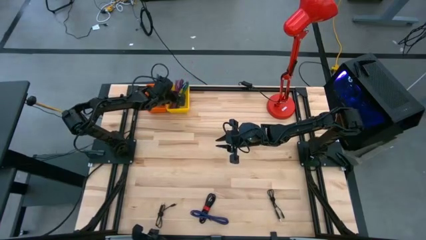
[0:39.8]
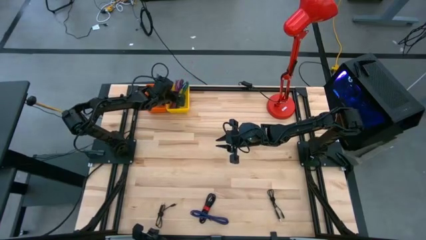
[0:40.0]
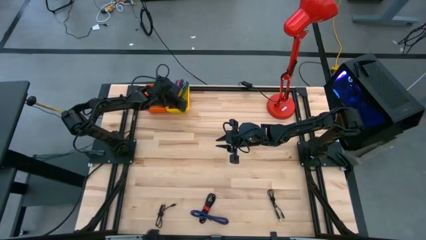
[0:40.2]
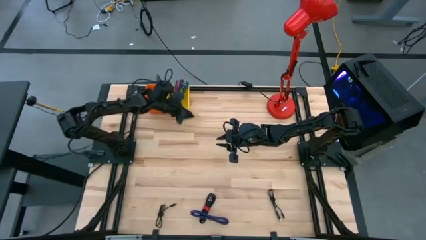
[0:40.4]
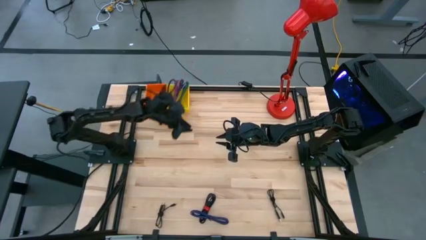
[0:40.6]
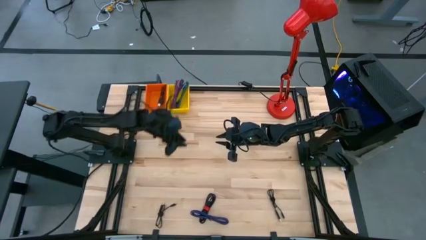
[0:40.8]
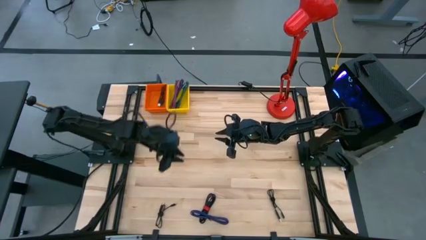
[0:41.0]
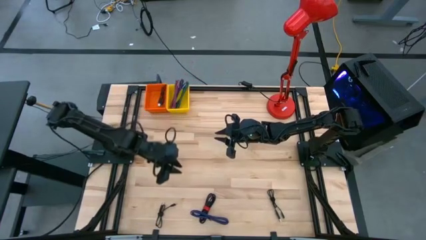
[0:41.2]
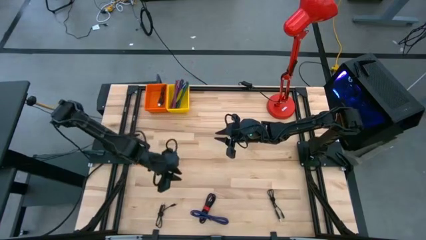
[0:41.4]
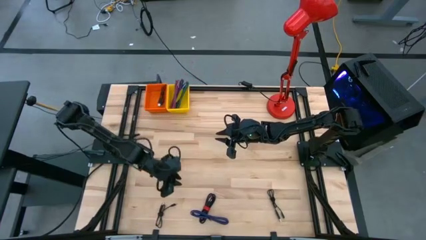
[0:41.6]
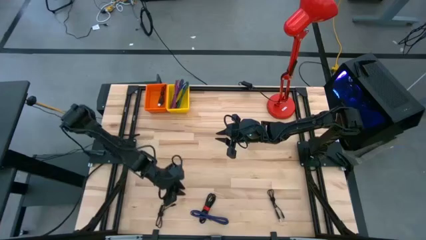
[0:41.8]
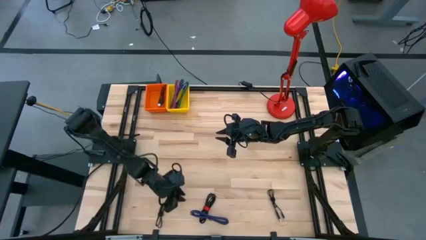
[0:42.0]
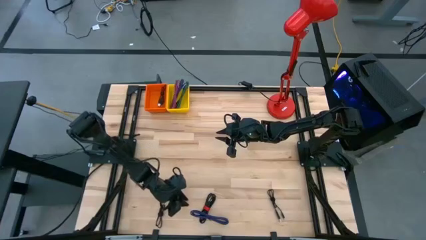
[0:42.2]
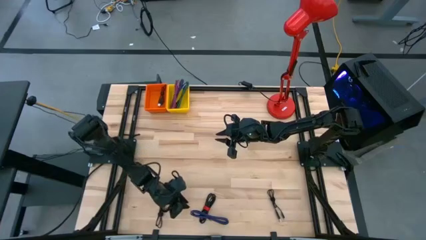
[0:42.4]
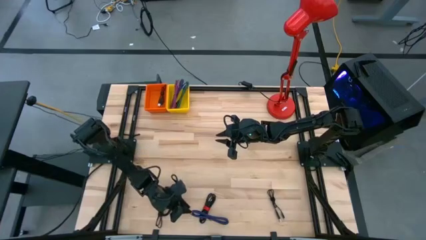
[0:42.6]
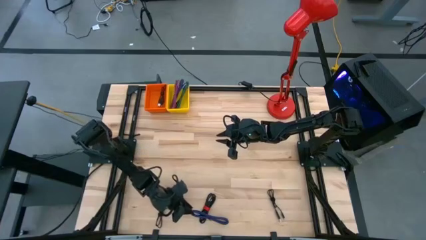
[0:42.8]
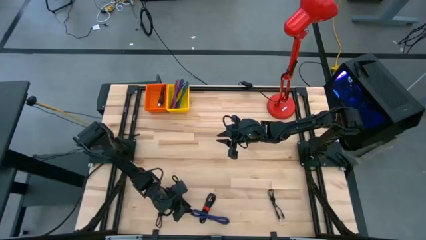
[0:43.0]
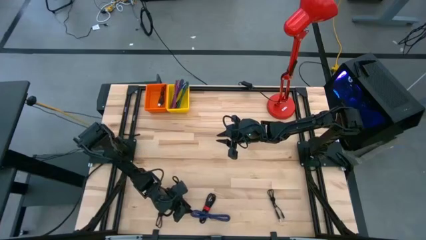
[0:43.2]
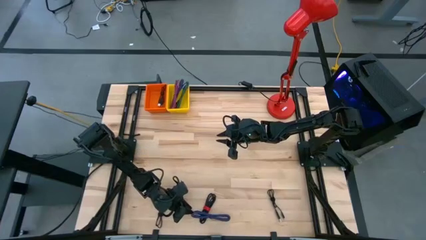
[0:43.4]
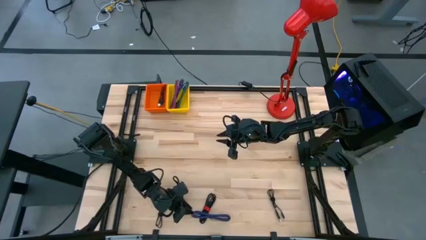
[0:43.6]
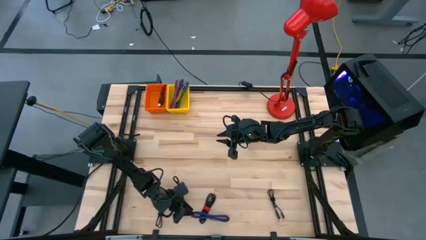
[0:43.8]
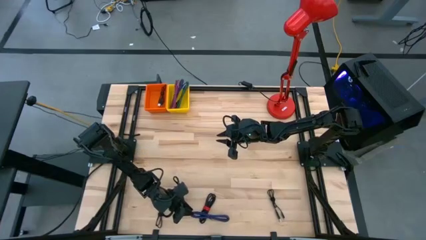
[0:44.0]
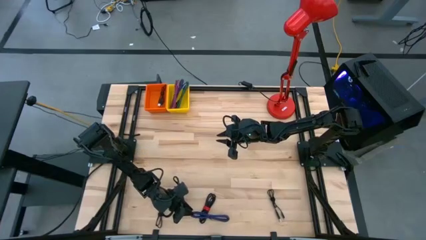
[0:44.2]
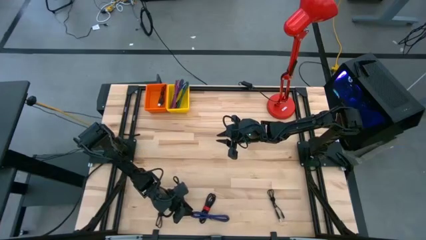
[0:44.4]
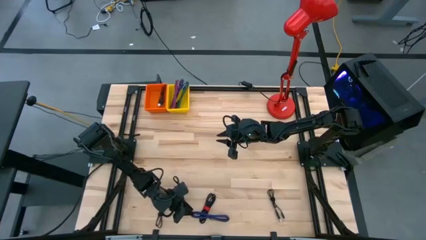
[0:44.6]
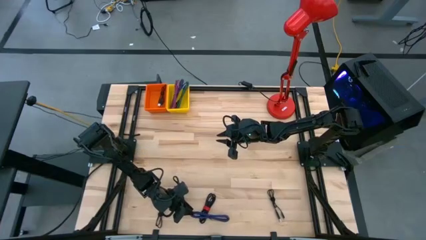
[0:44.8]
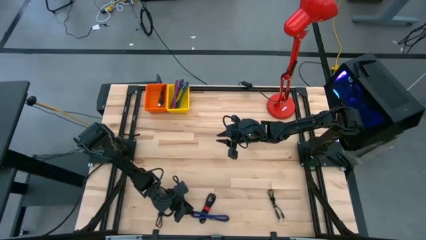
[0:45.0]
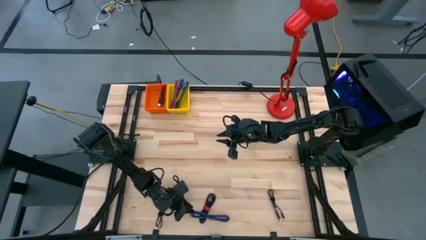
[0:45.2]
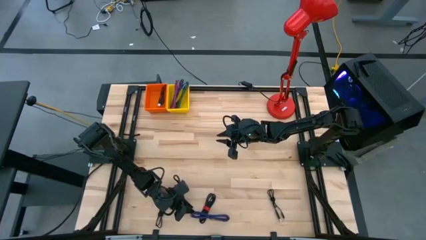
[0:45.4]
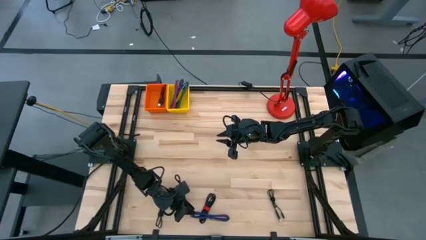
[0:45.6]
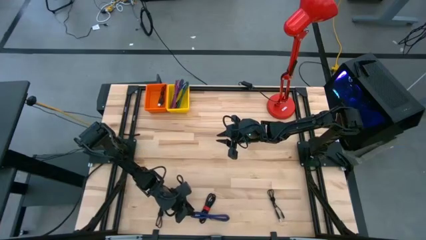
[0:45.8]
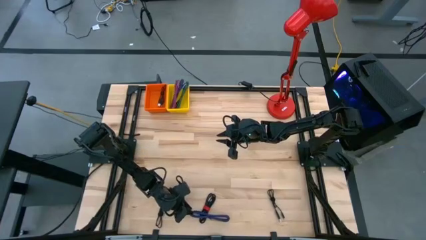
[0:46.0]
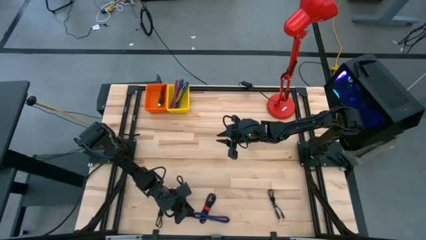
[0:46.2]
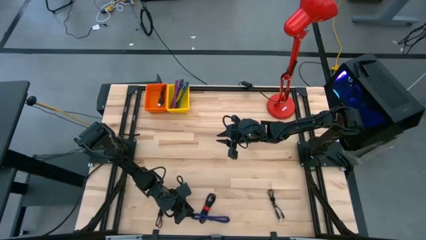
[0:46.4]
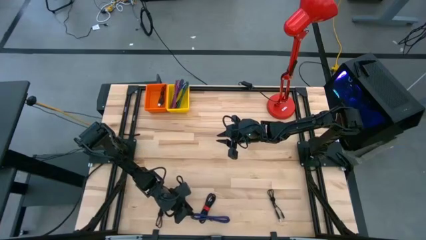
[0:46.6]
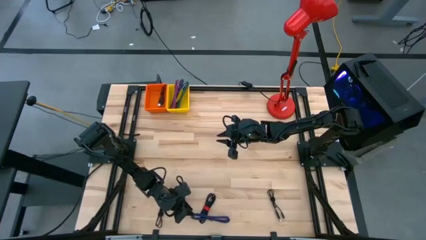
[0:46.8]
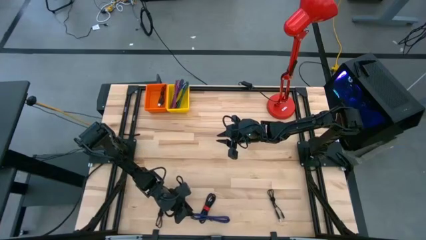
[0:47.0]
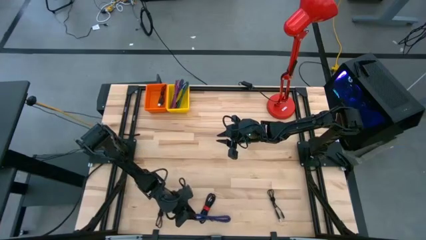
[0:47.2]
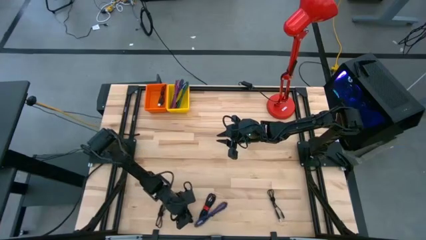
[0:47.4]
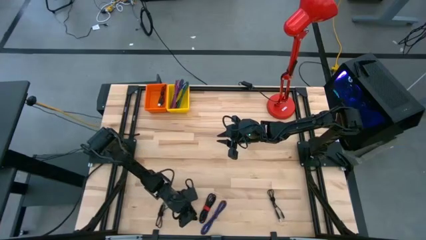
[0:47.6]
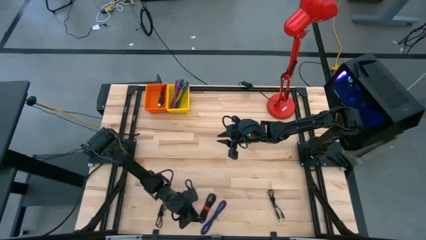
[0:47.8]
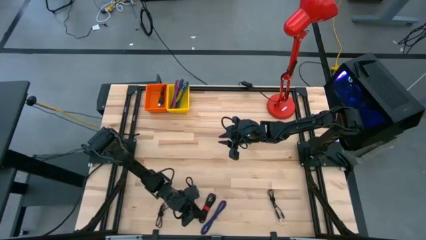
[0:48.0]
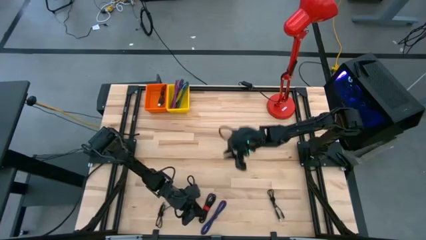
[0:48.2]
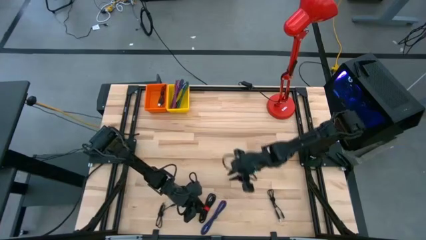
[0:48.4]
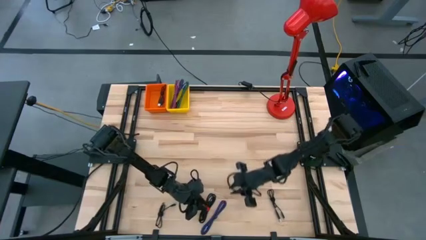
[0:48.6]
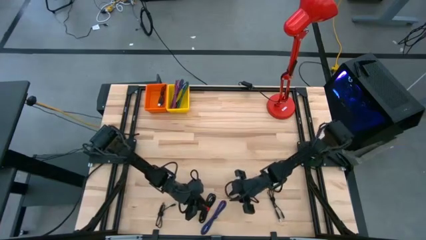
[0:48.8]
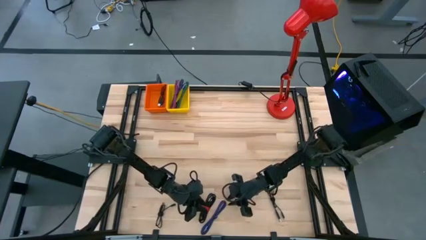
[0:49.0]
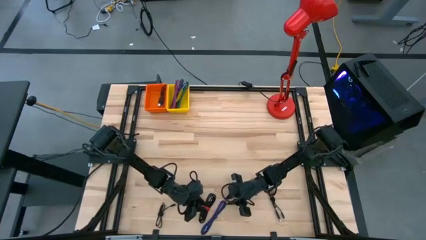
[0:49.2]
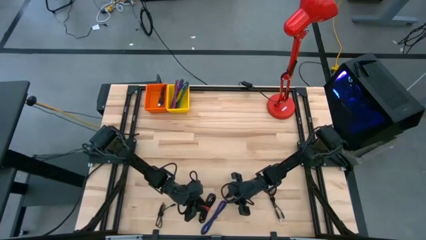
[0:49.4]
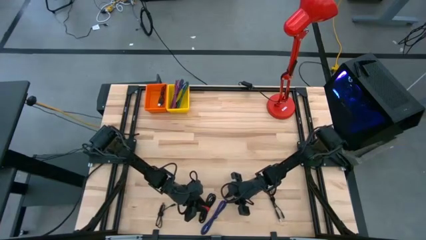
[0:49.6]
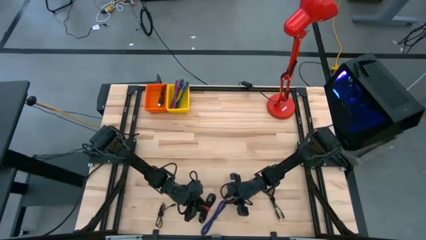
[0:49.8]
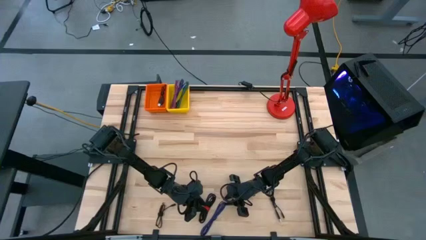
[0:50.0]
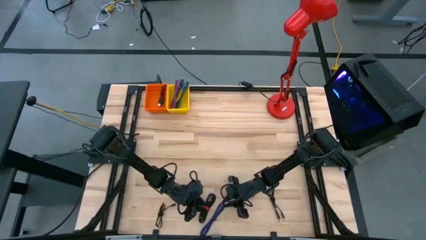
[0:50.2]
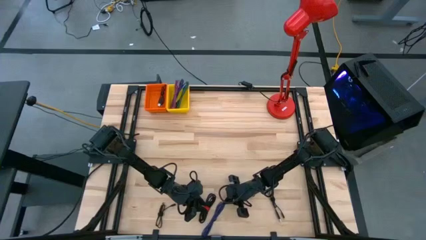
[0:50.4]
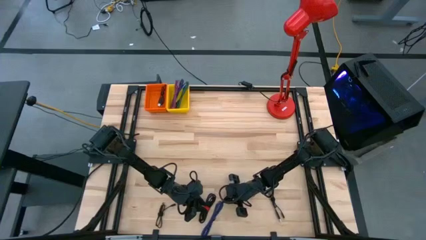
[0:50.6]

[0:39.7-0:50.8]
Task: Pick & Place USB Port
Put the black and blue USB cable into the yellow bin

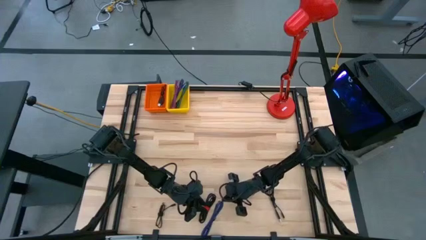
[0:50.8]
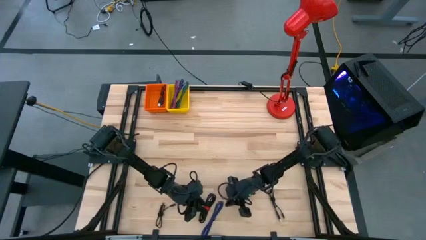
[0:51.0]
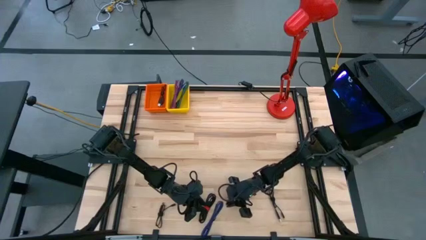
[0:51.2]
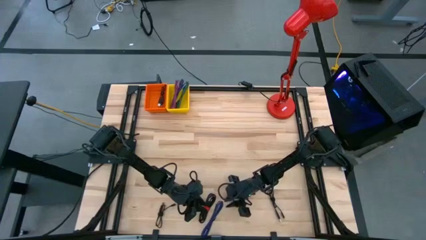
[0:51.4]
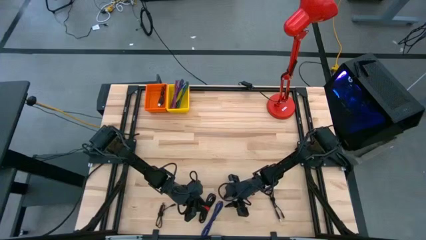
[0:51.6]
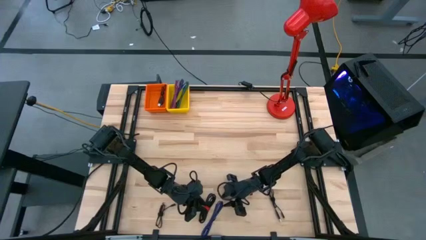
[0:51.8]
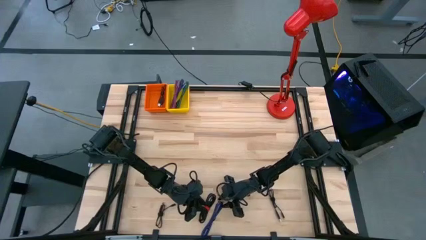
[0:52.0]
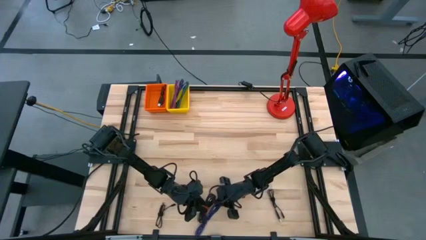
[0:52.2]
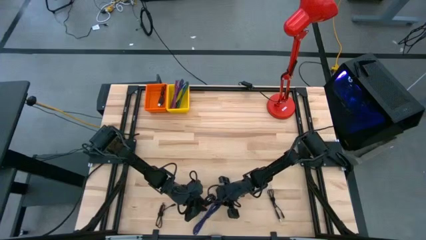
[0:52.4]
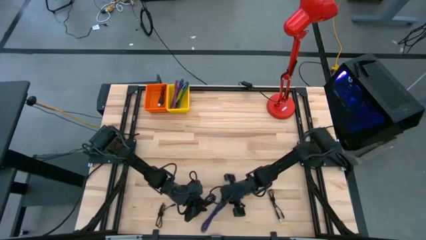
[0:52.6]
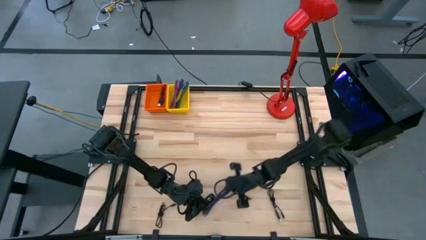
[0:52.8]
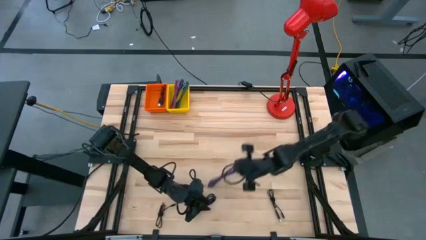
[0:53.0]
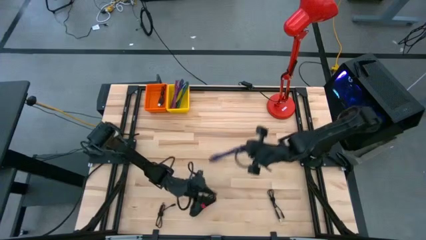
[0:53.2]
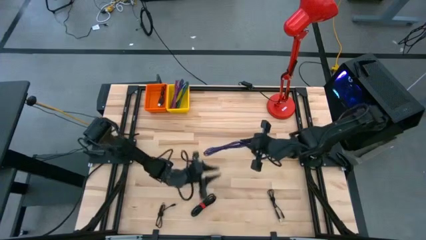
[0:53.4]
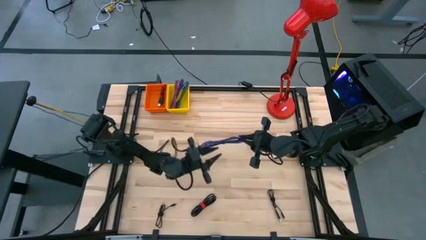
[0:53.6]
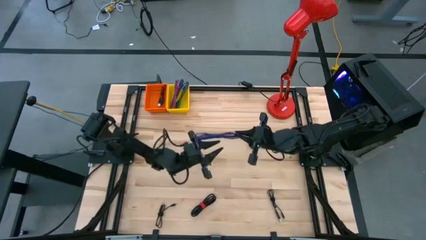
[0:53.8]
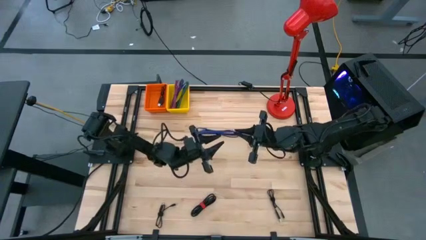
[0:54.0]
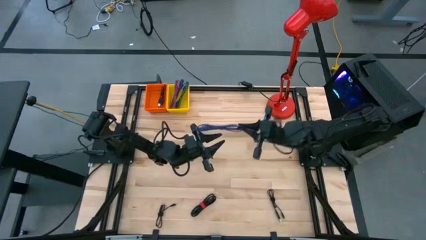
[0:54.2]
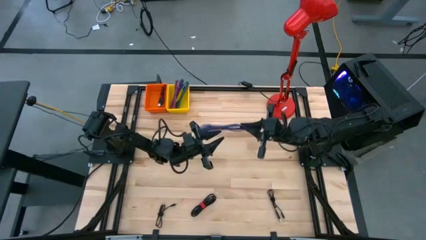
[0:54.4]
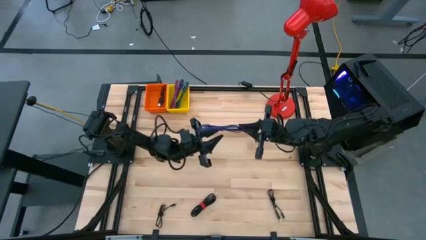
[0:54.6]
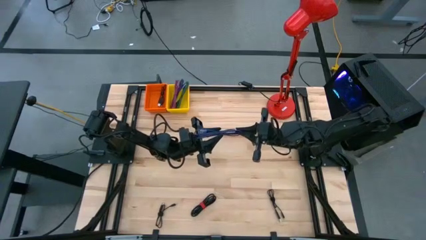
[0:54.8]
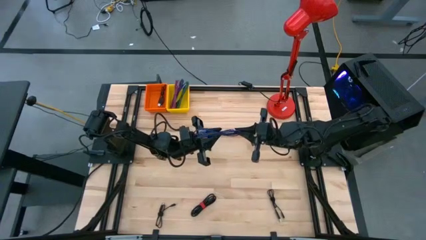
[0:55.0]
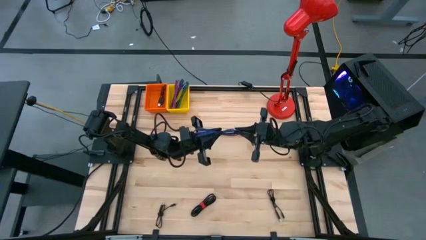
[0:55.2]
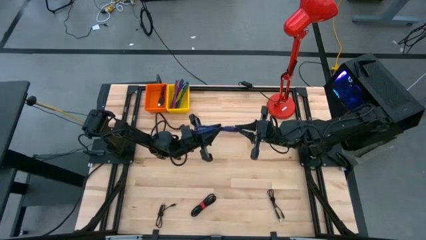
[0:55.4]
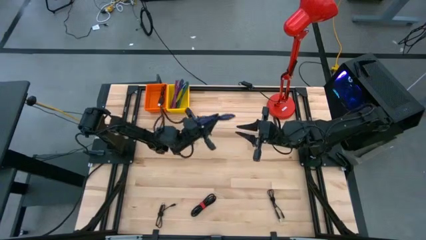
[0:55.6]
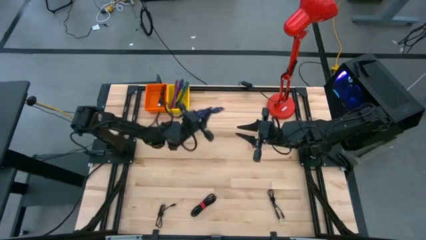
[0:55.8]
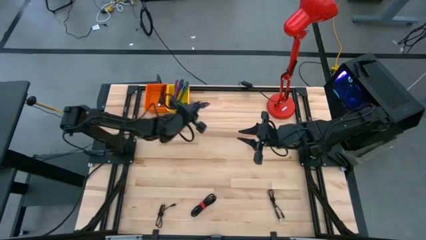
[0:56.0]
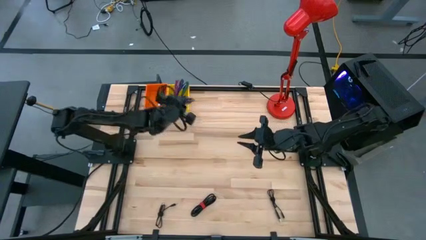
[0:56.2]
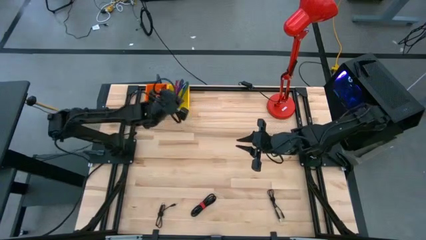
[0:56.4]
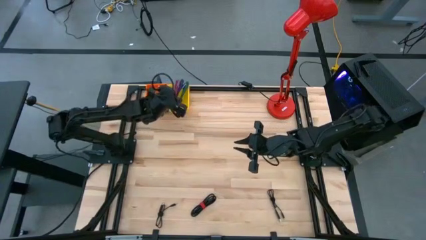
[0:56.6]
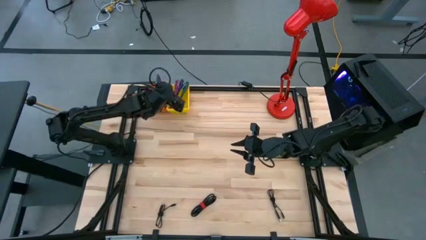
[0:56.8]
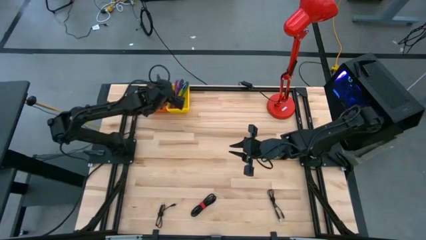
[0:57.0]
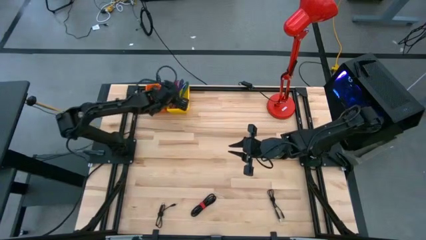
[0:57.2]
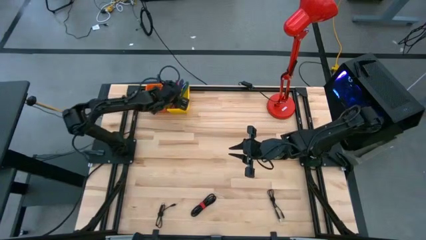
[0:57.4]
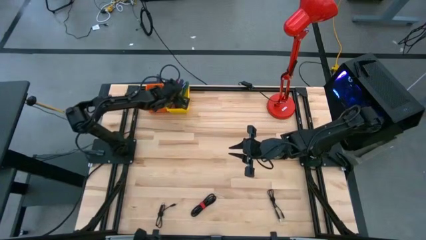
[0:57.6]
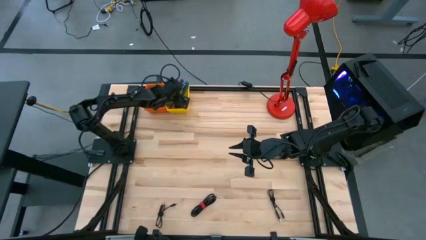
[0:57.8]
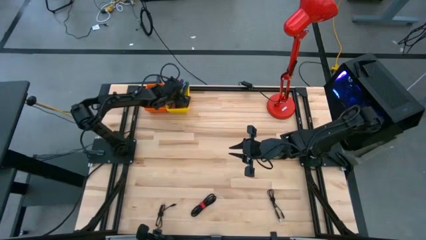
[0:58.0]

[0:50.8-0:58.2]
Put the black and blue USB cable into the yellow bin
